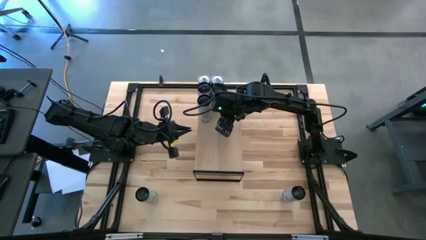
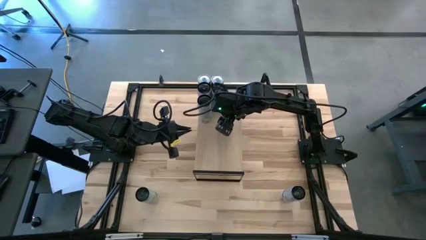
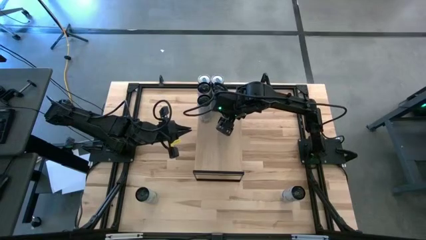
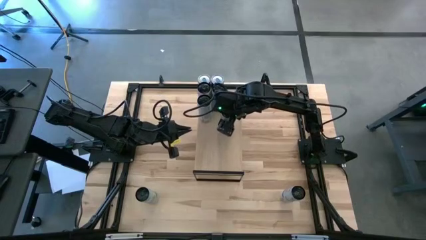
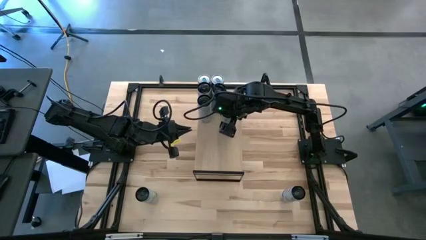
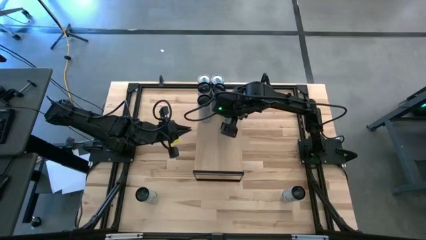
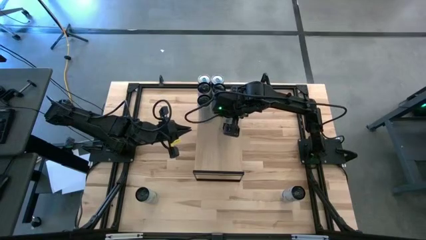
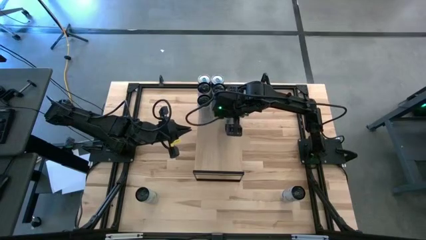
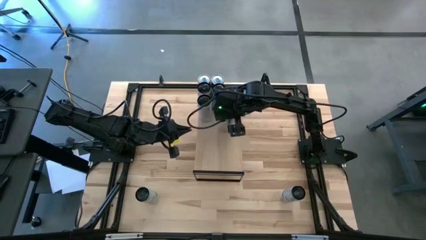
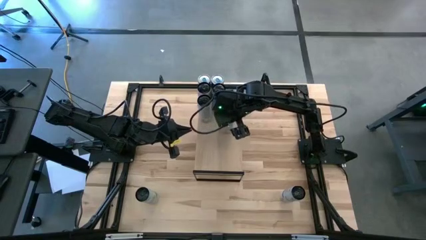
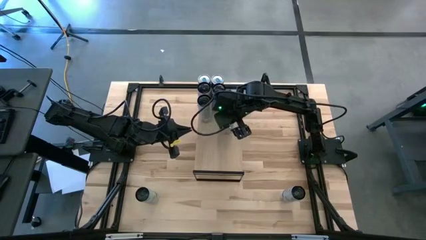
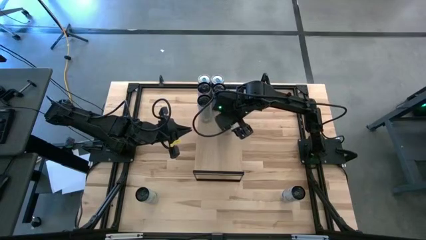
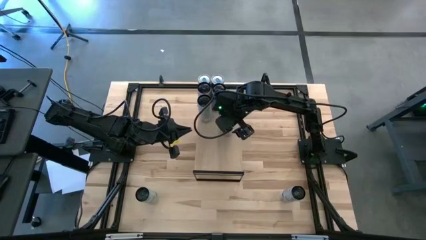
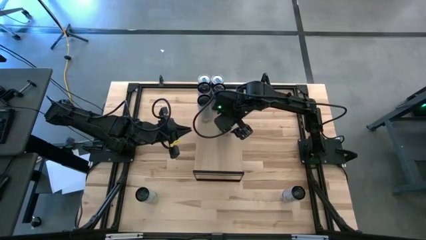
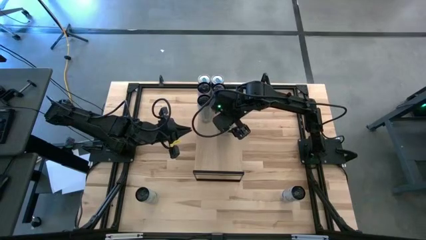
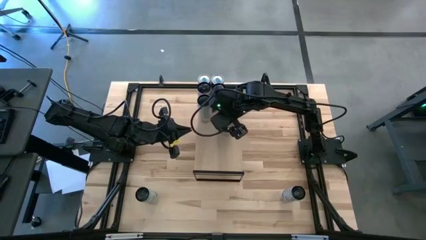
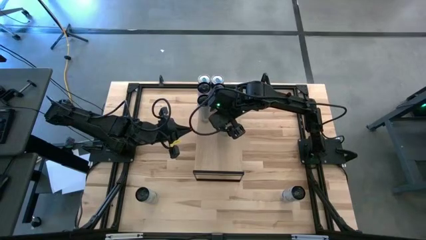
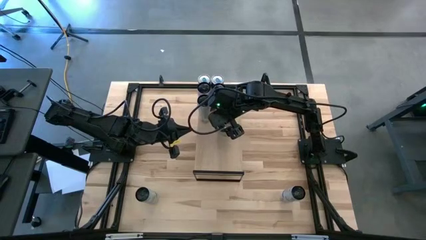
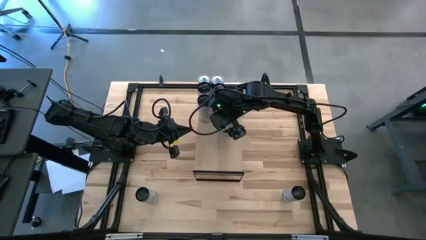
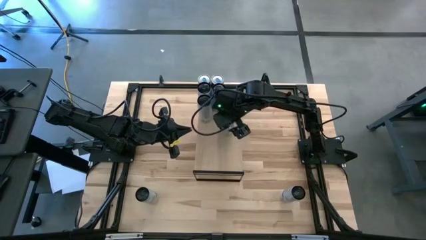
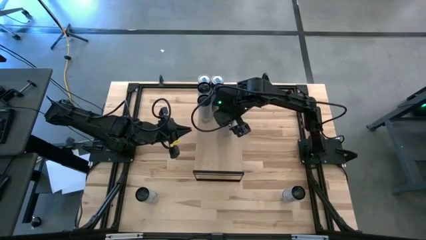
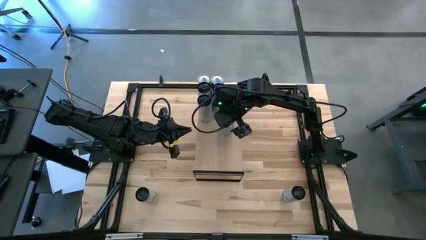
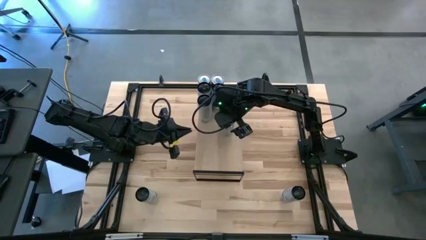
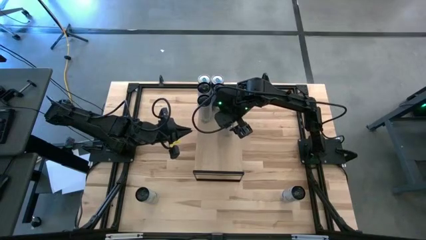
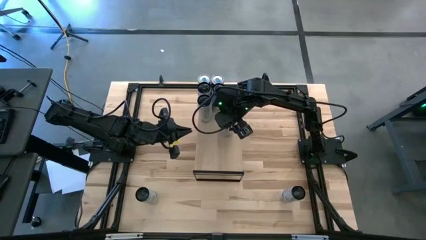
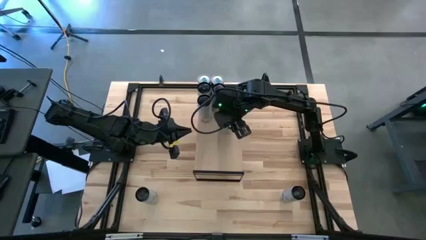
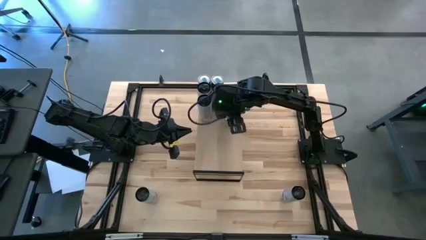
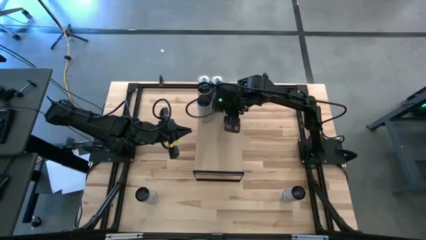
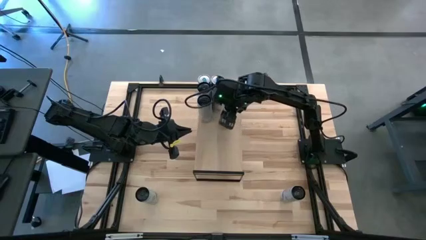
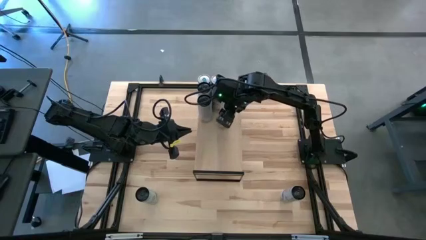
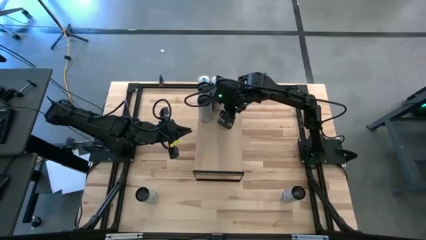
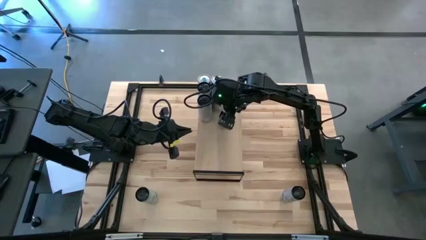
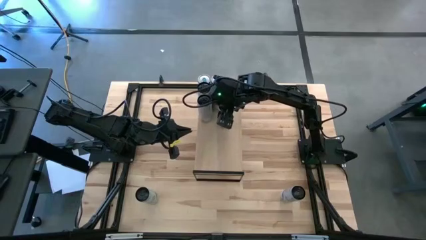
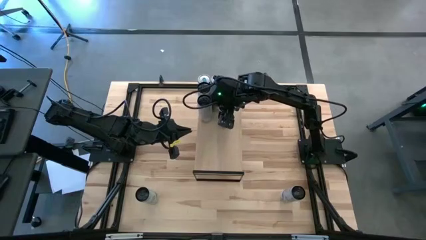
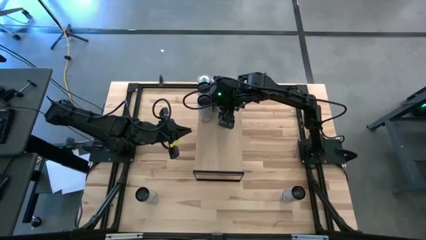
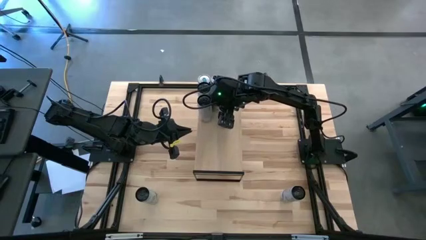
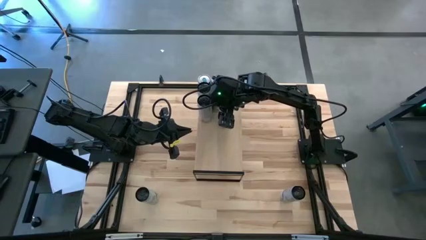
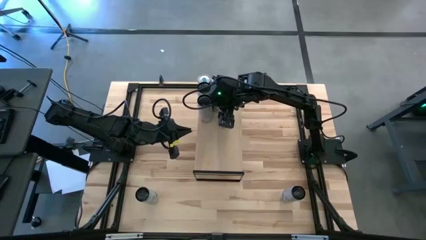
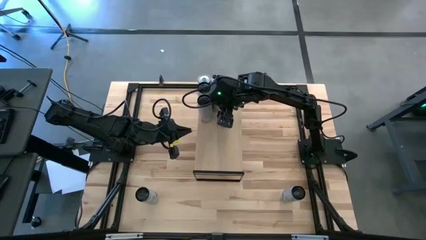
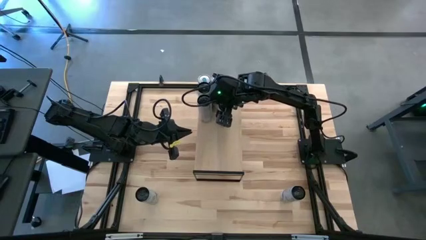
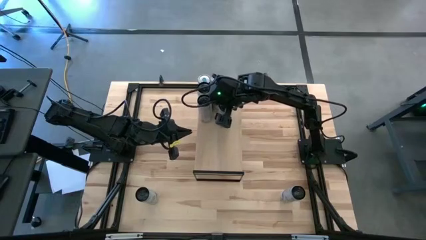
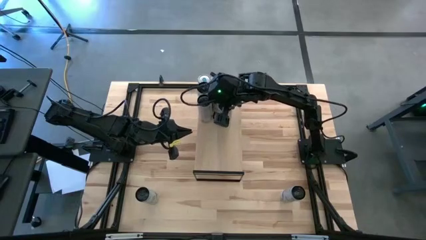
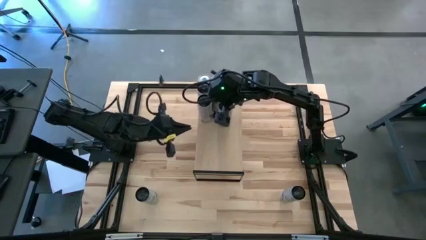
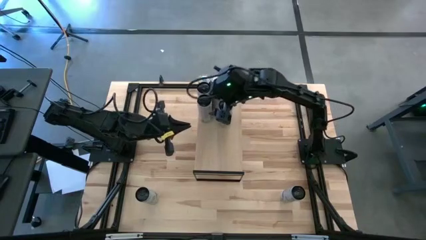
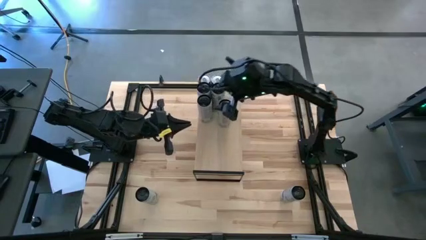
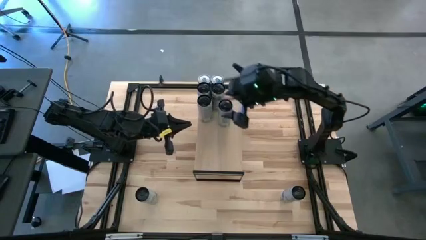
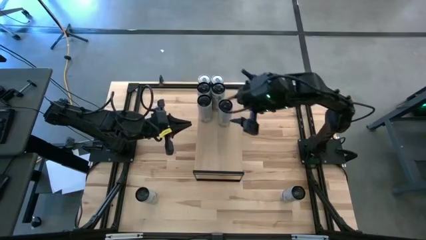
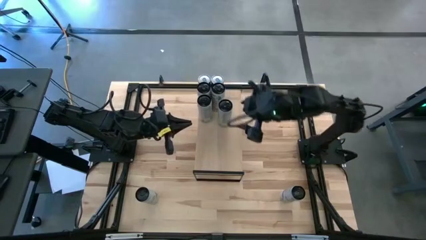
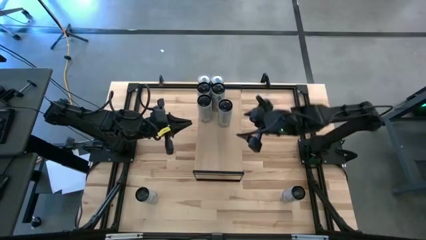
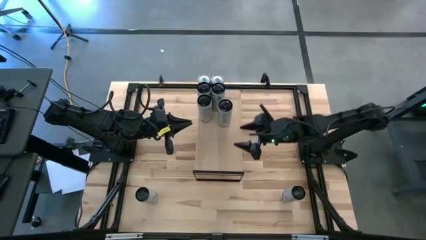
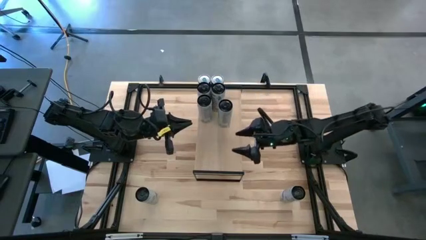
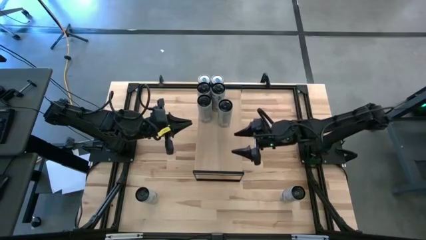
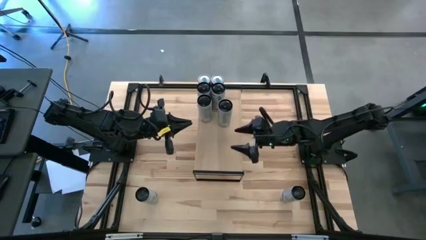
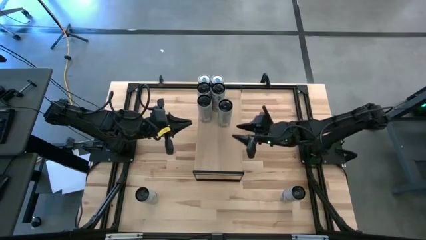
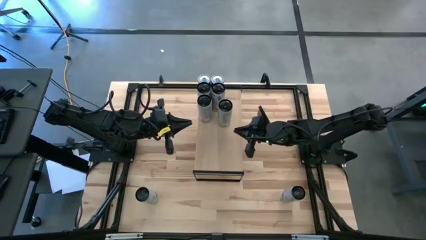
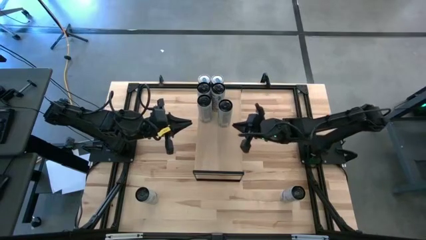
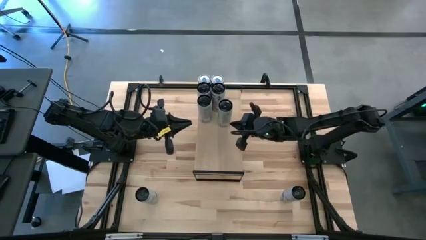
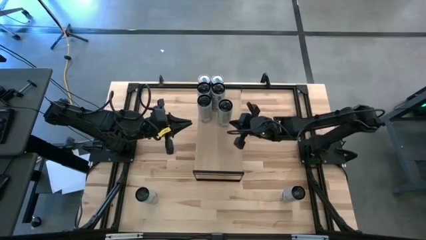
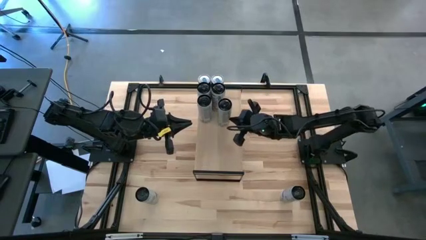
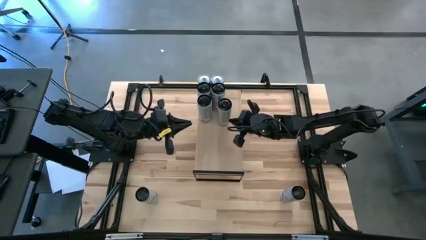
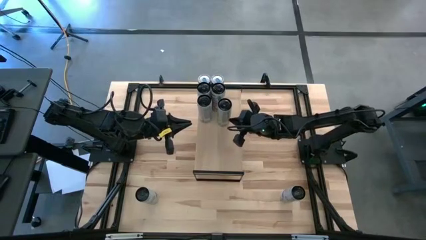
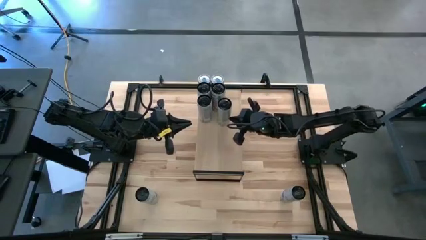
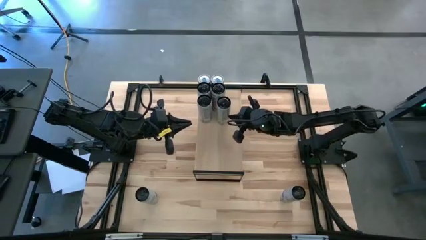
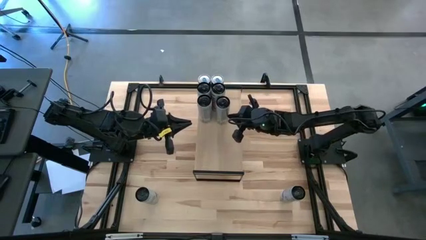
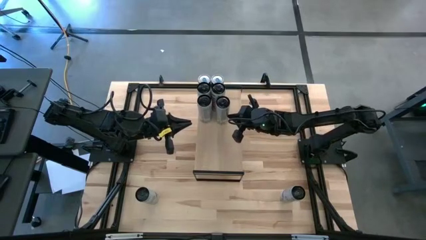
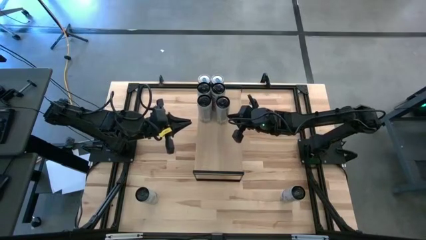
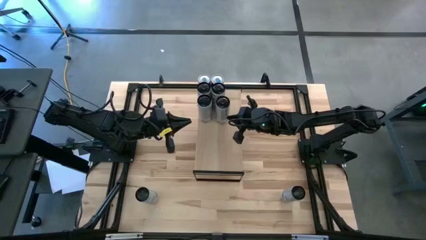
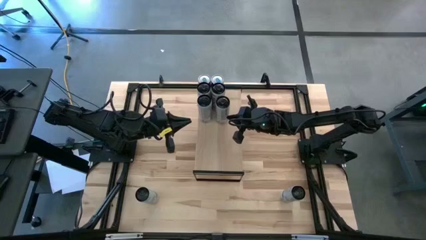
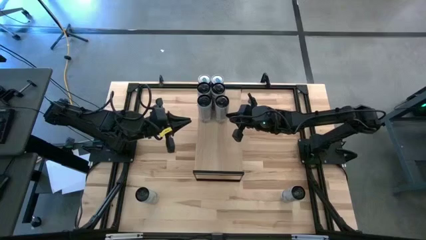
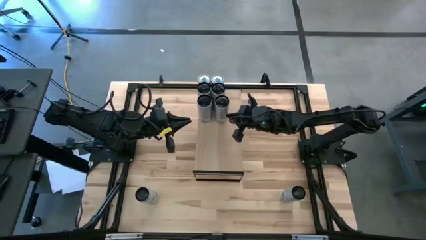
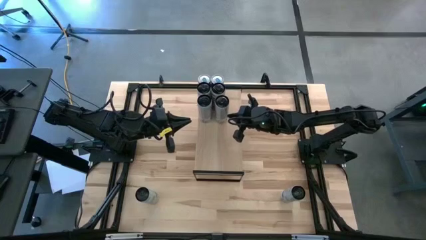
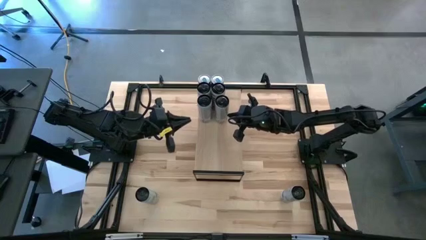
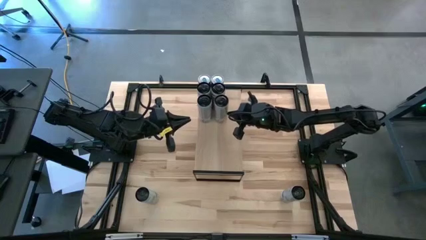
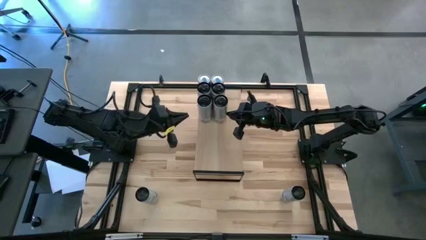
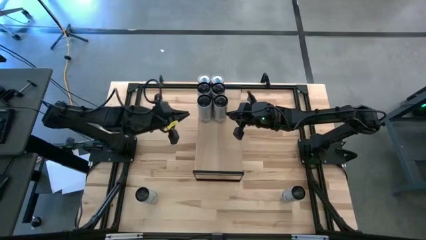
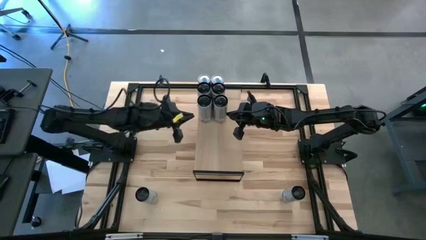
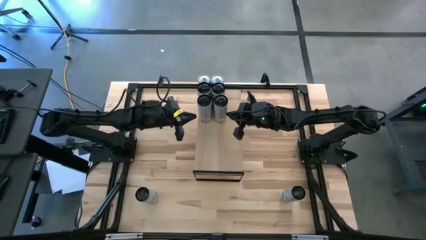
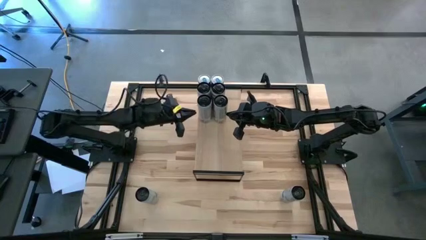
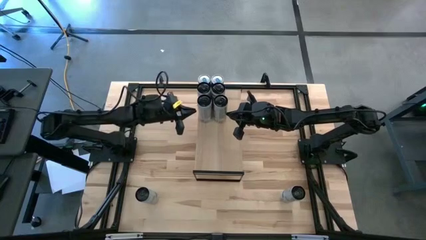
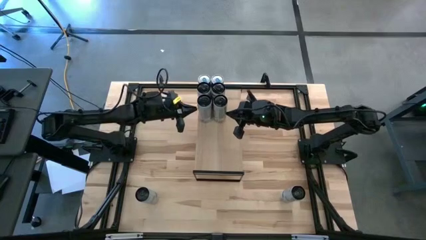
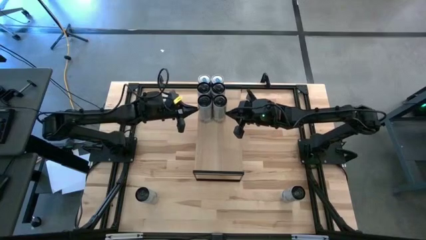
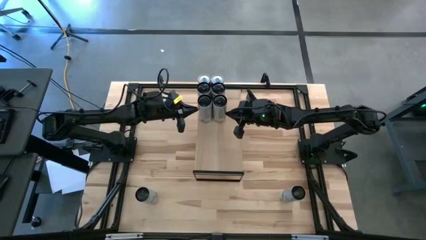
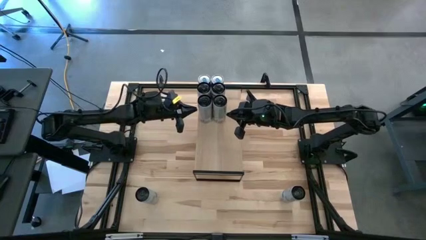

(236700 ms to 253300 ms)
Task: Place canned beverage on shelf
Put the white yellow soda can on the shelf aligned with the other white yellow soda can
